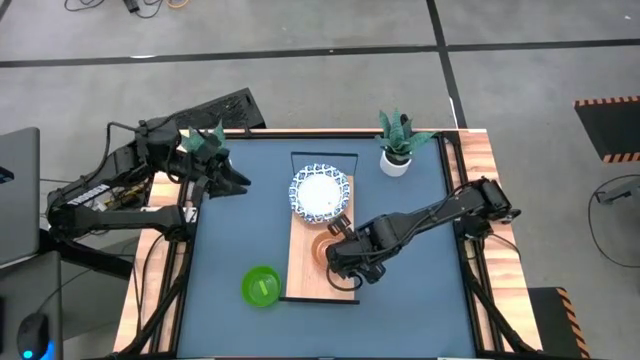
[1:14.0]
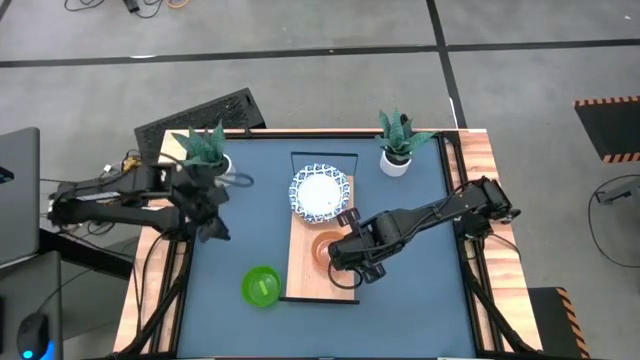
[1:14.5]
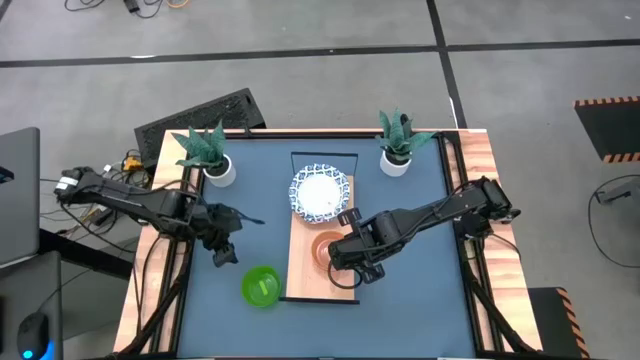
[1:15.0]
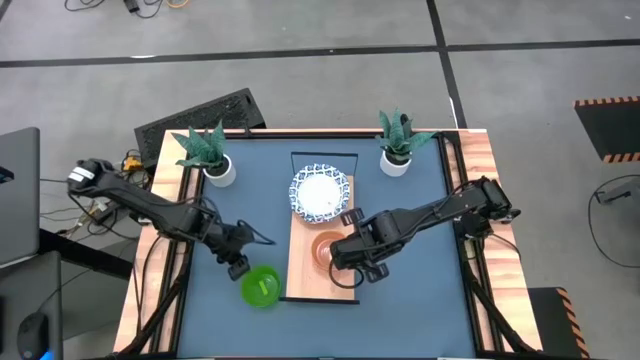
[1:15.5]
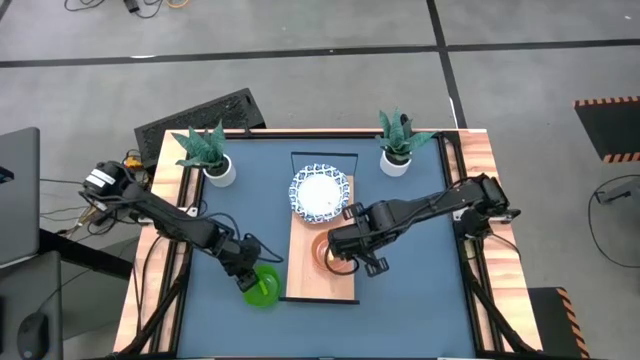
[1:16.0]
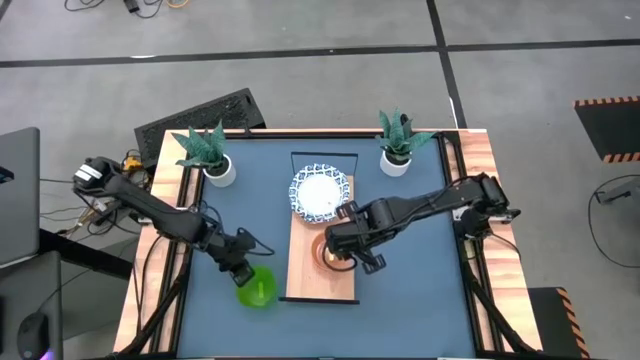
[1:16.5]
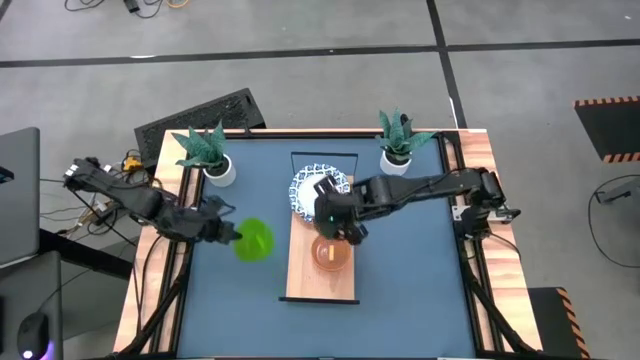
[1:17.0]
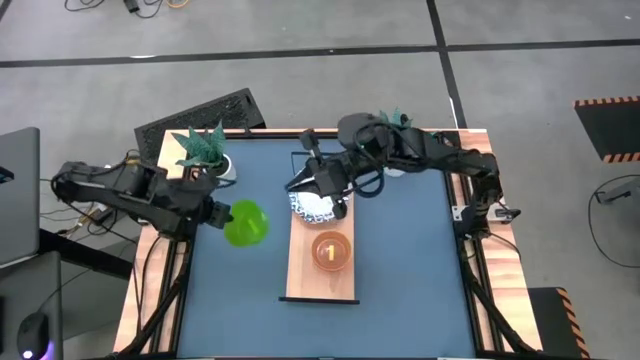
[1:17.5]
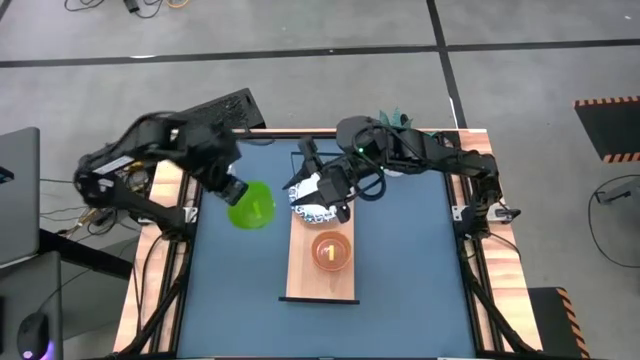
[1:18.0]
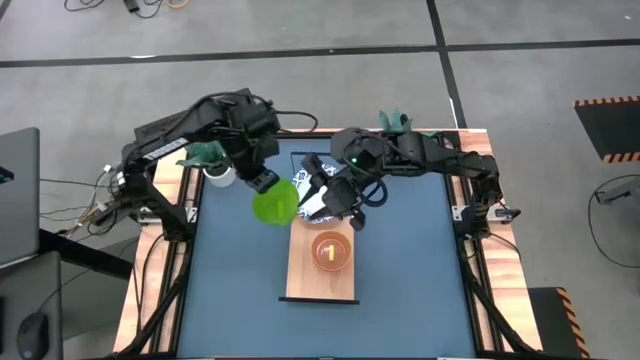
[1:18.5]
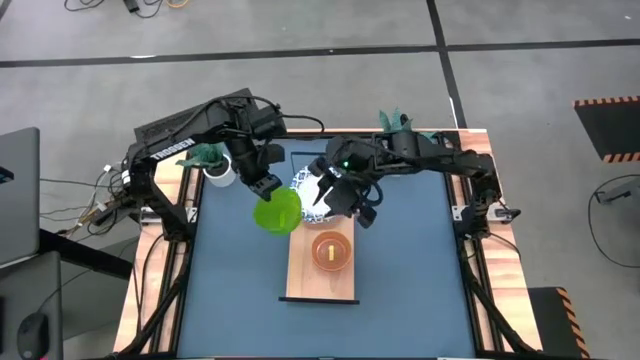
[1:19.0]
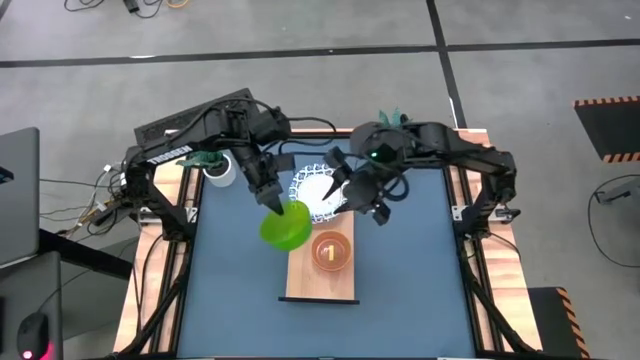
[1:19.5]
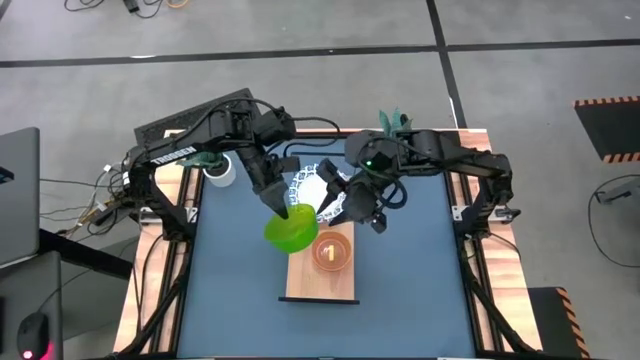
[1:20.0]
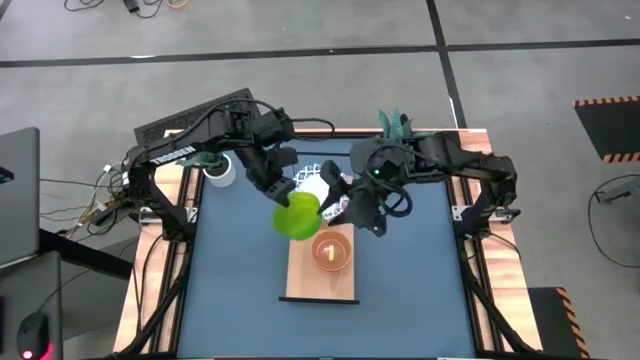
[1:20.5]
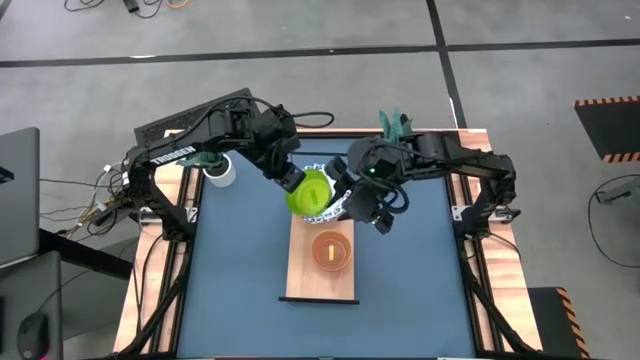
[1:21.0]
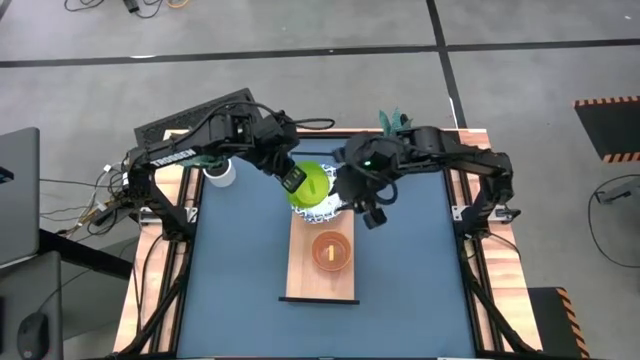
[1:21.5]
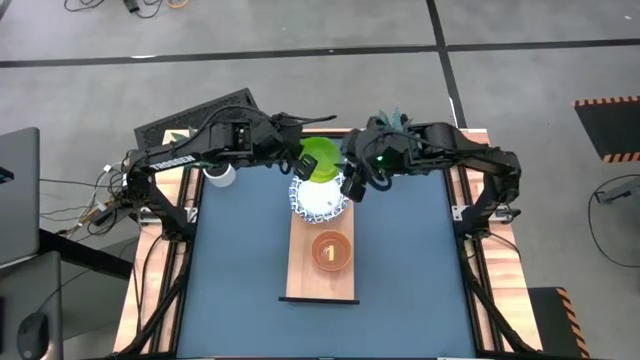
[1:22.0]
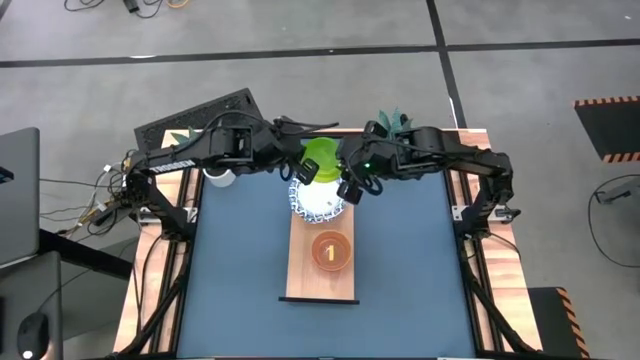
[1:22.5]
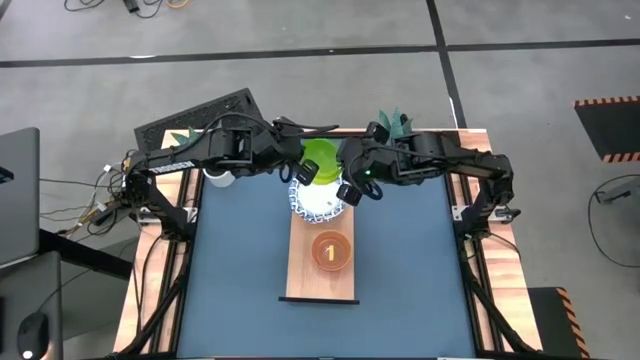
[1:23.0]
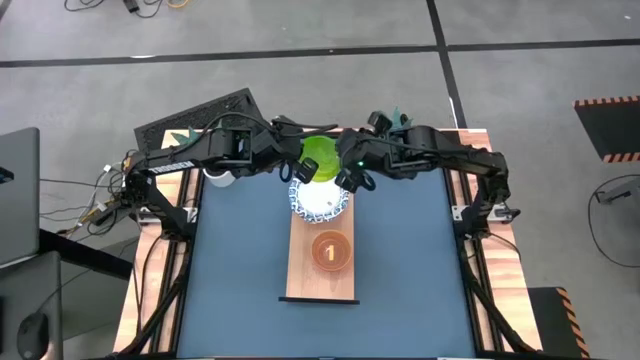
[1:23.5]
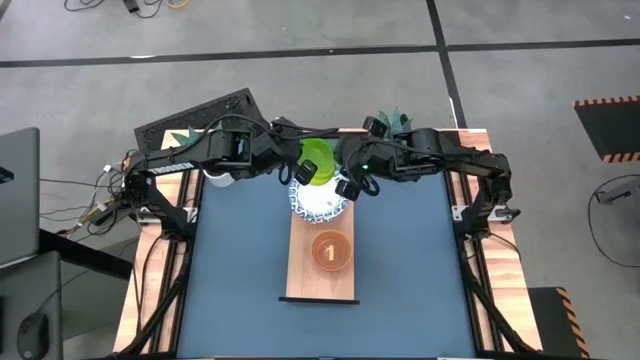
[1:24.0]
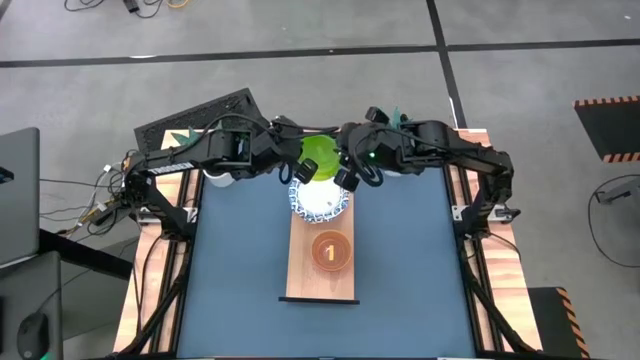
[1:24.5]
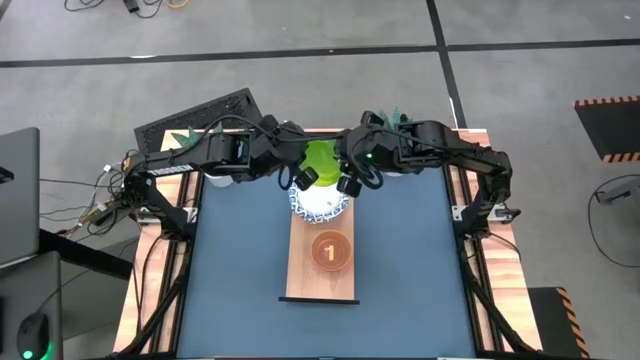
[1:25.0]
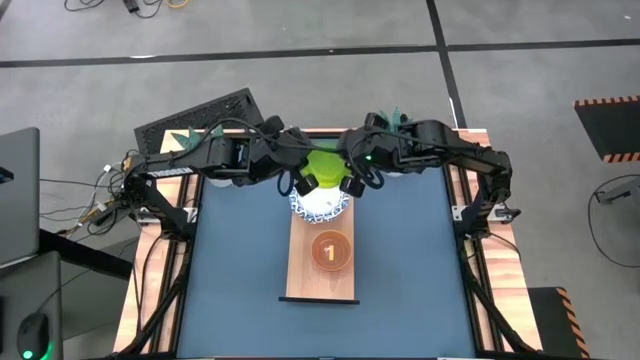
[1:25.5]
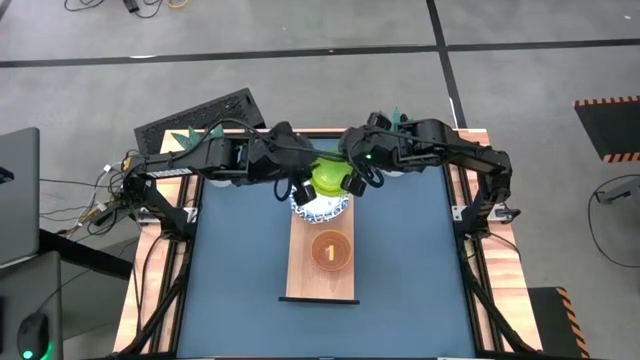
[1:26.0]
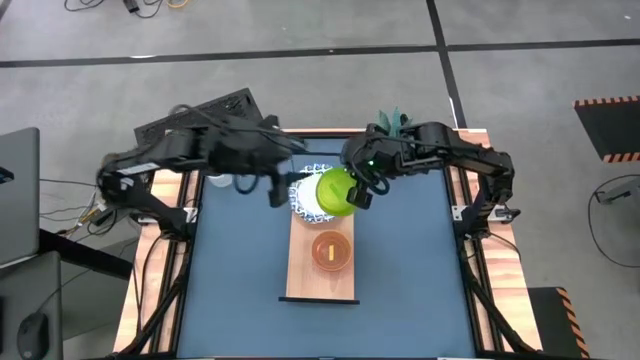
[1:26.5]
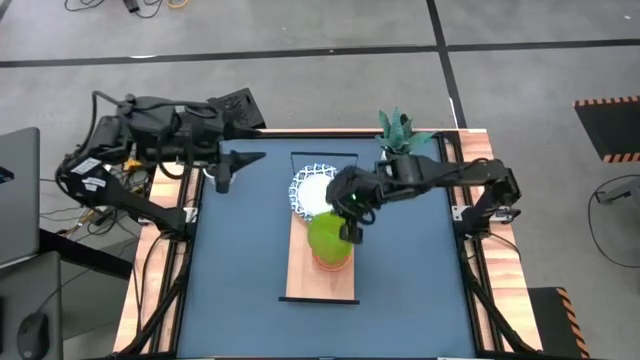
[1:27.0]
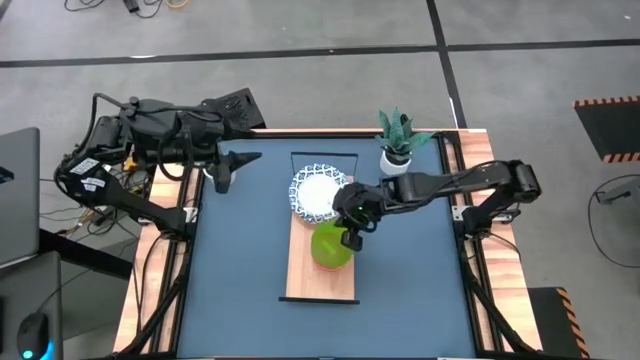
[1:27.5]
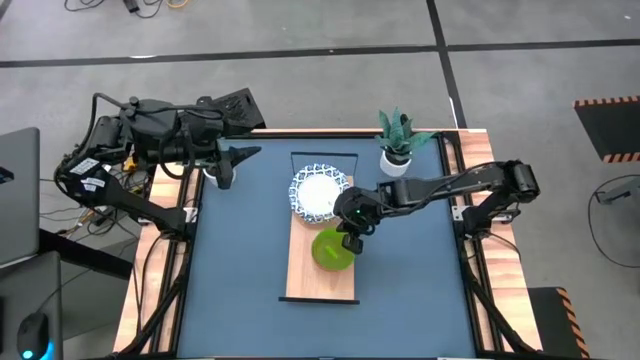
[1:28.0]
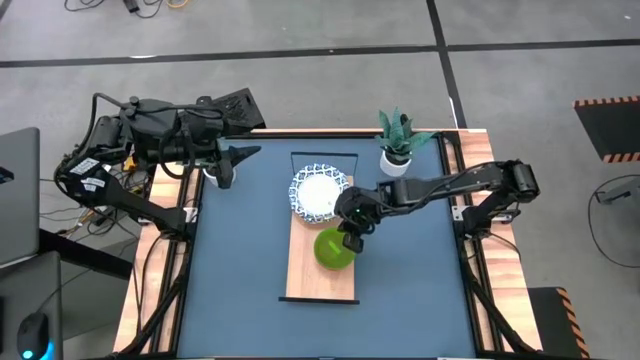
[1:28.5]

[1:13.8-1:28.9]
Task: Place and stack bowls onto a shelf
Stack the green bowl on top of the yellow bowl on the shelf

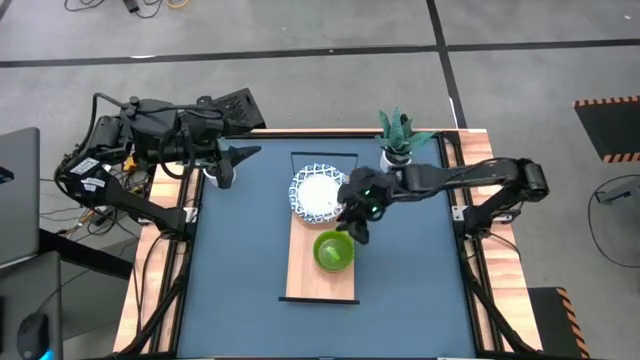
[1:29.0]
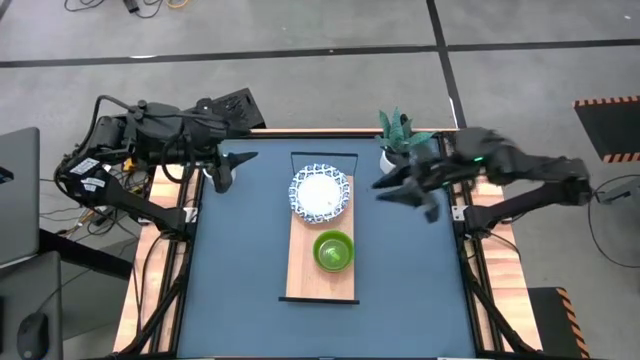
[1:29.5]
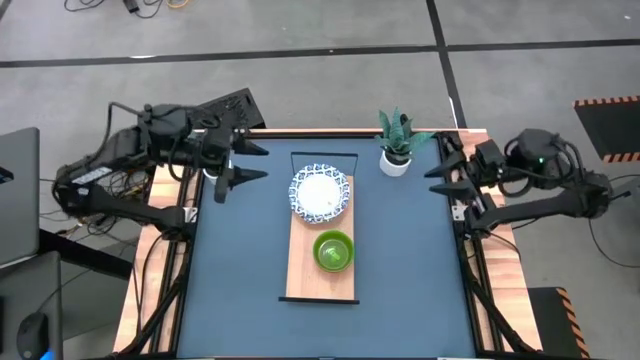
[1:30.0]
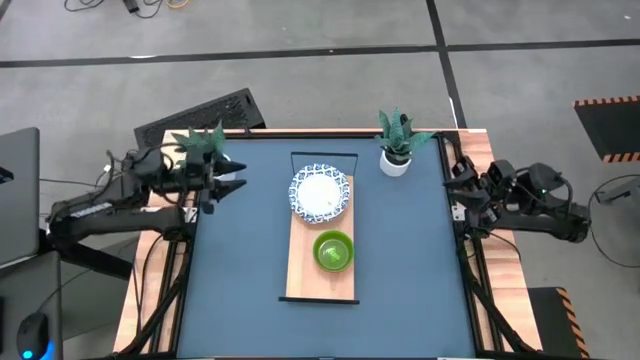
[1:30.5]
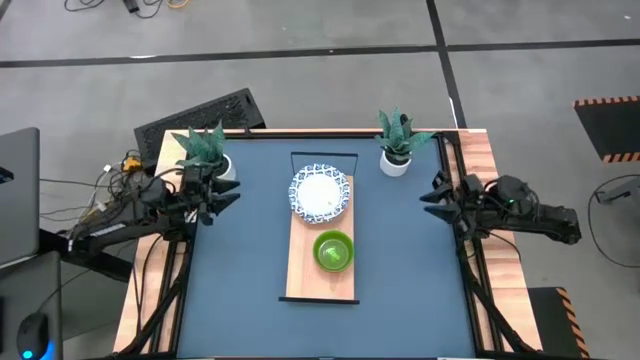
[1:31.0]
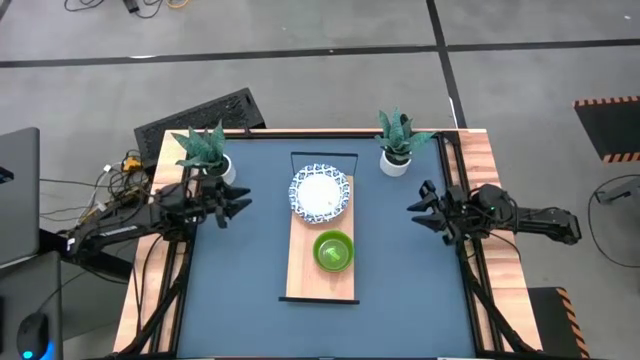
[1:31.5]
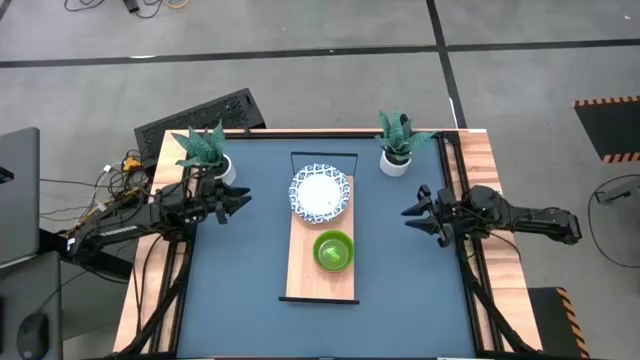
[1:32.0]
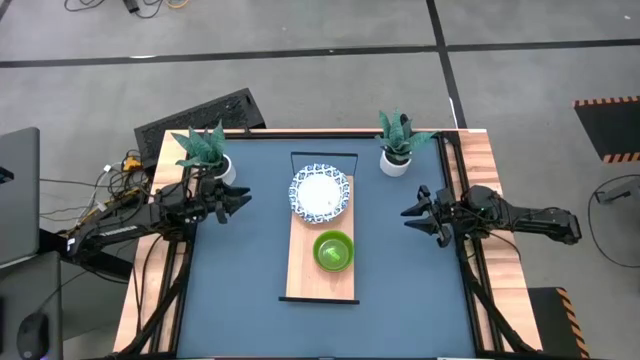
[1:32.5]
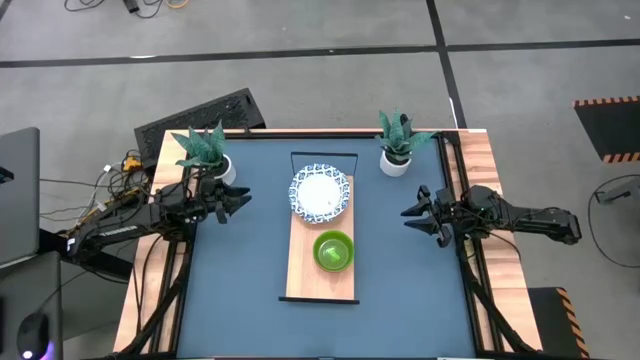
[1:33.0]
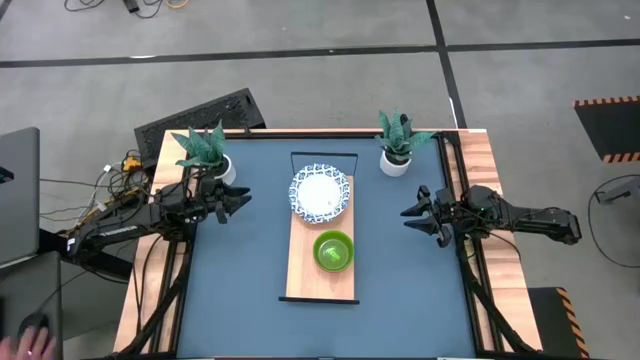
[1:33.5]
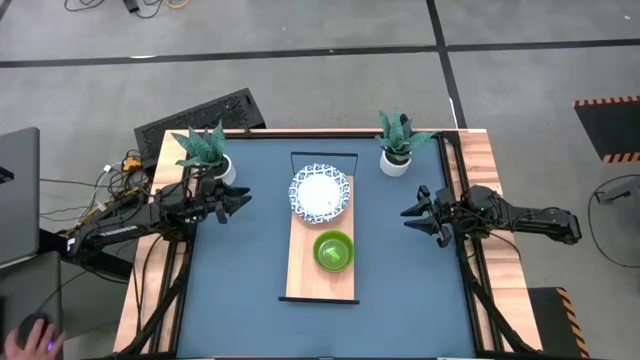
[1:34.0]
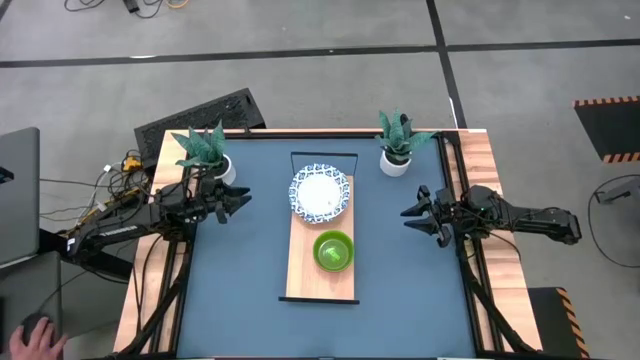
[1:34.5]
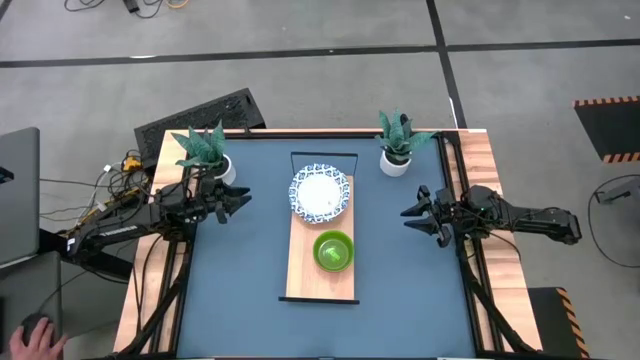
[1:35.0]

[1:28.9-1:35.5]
Return to Home Position
